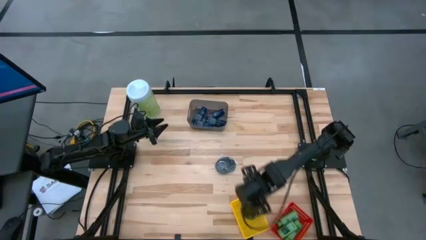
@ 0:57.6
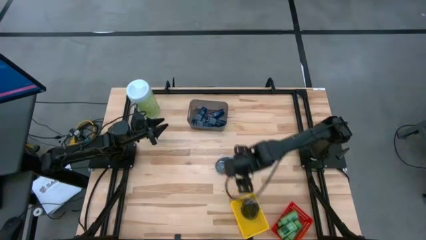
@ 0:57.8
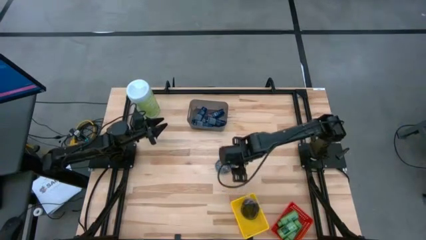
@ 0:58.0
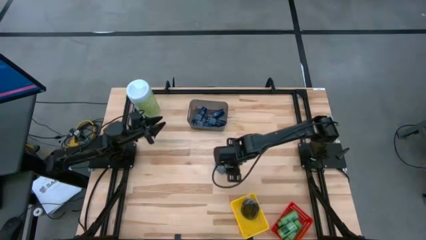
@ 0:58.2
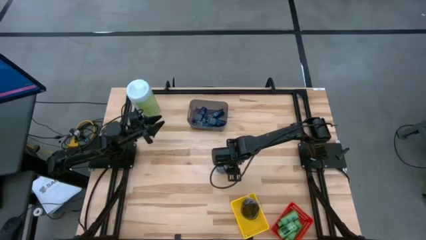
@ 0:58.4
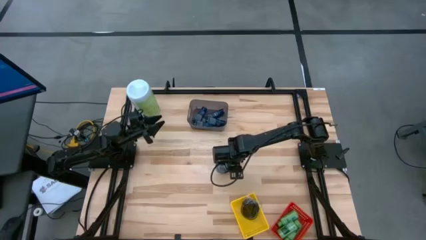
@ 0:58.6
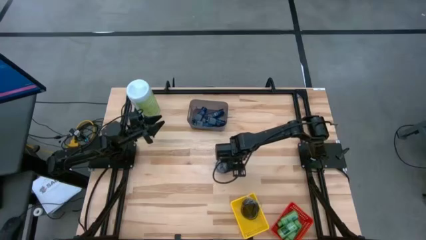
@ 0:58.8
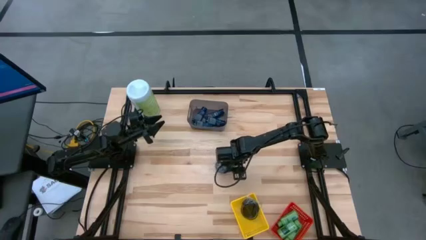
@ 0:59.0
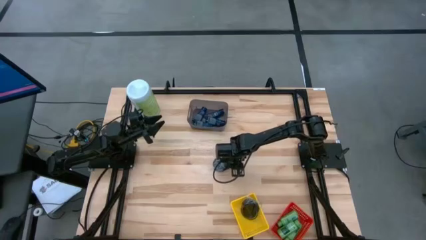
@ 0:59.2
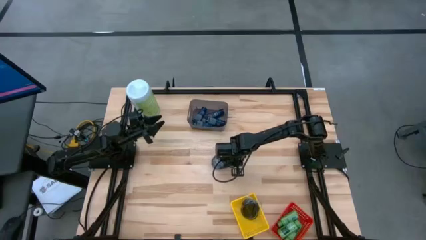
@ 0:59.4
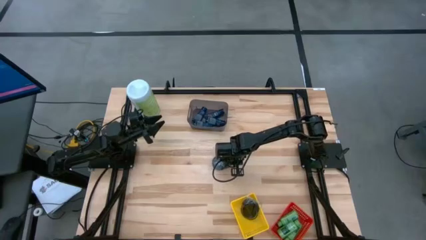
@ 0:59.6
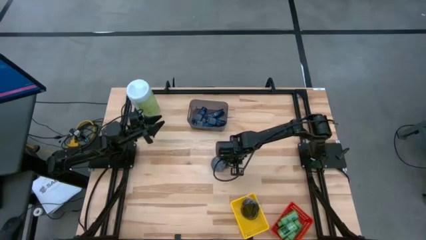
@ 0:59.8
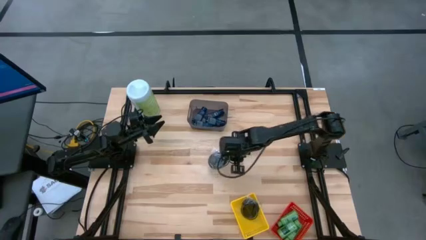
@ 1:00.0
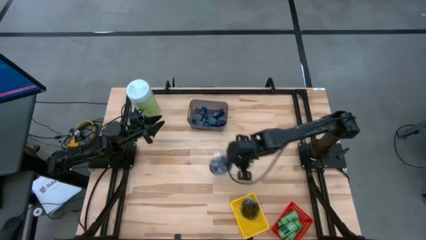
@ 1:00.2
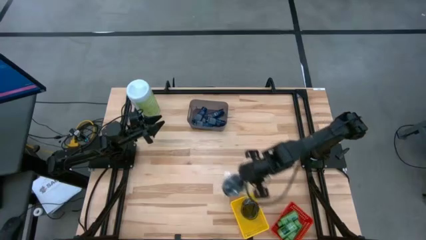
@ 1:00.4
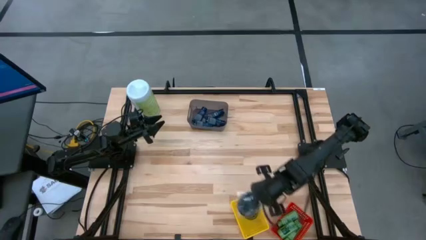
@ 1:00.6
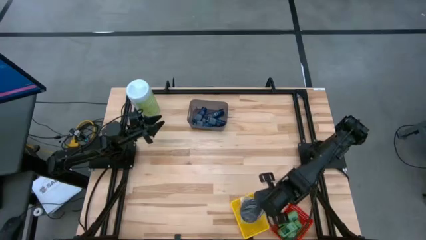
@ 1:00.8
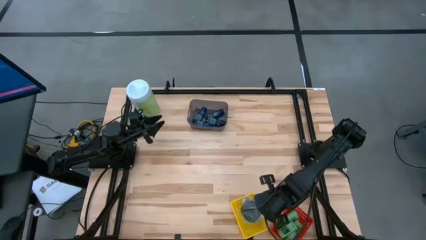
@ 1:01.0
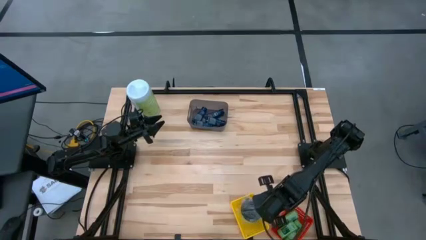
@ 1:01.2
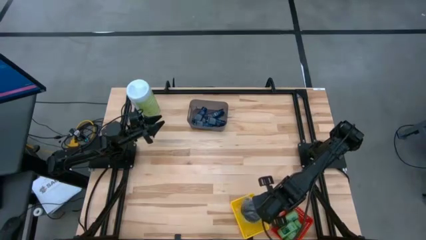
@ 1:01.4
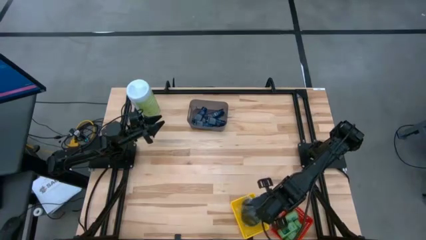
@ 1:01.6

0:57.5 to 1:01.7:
Task: Pick & Place Travel size toiletries
Put the black hairbrush on the yellow bin

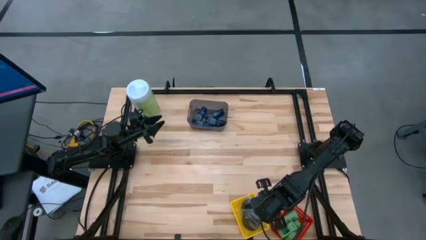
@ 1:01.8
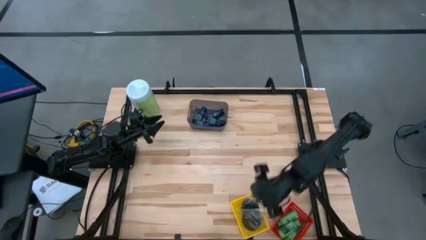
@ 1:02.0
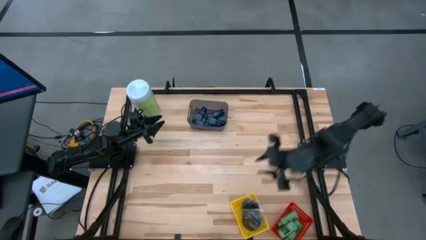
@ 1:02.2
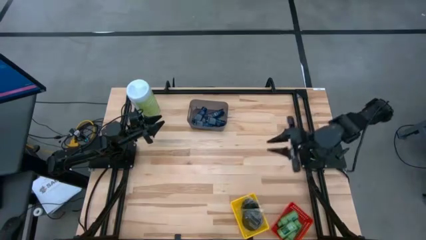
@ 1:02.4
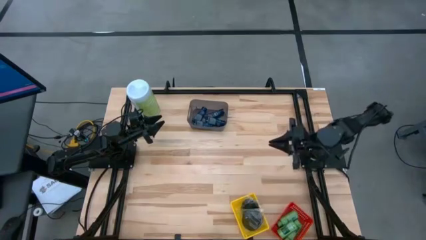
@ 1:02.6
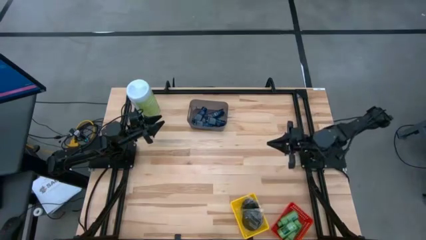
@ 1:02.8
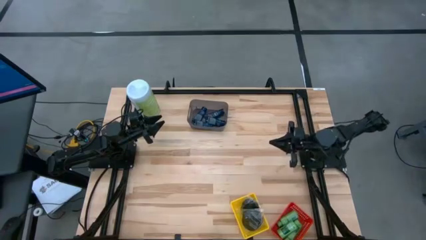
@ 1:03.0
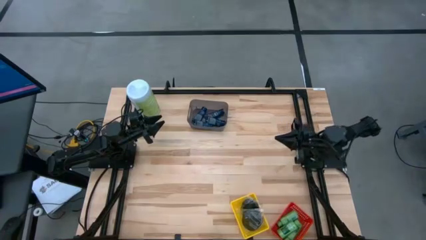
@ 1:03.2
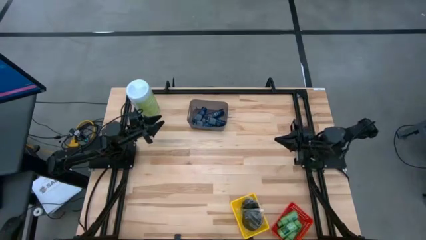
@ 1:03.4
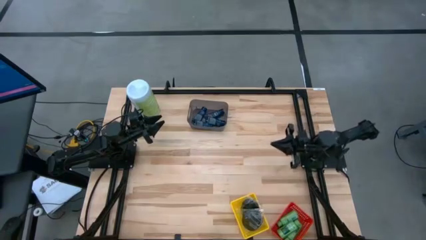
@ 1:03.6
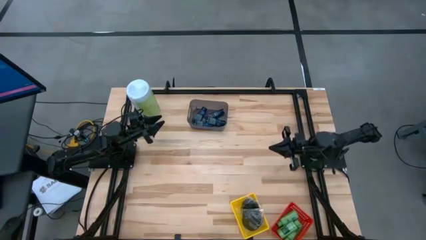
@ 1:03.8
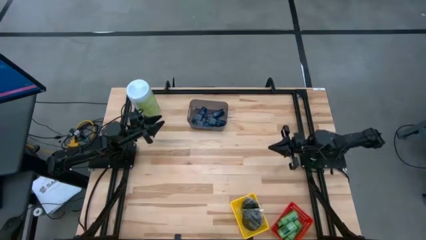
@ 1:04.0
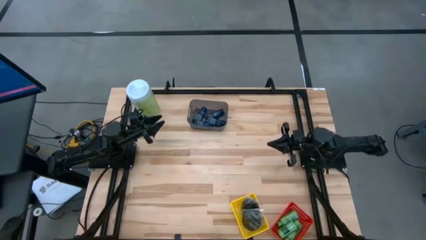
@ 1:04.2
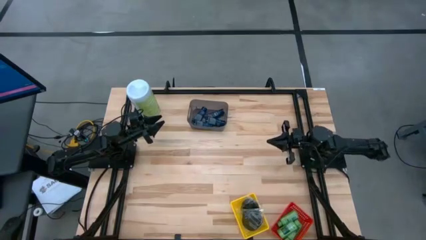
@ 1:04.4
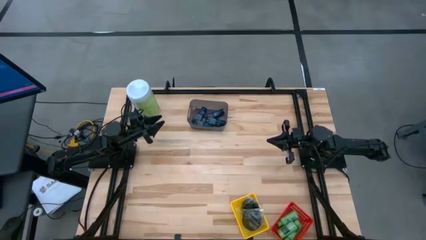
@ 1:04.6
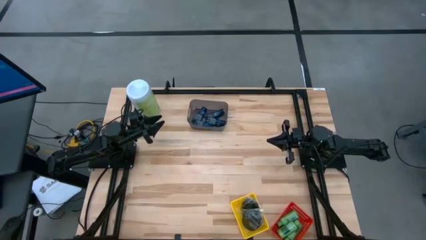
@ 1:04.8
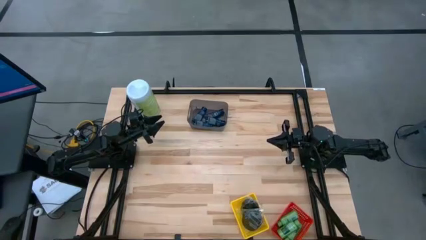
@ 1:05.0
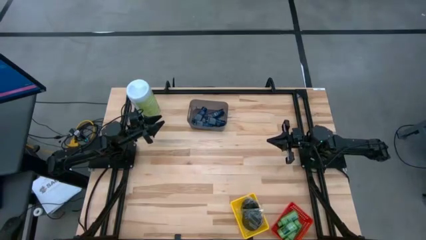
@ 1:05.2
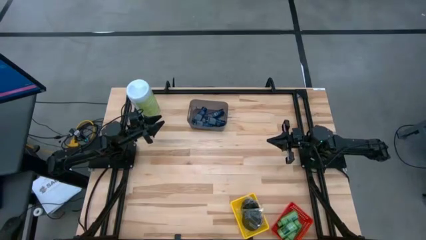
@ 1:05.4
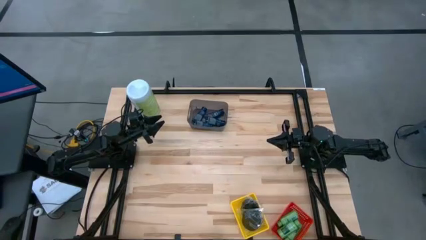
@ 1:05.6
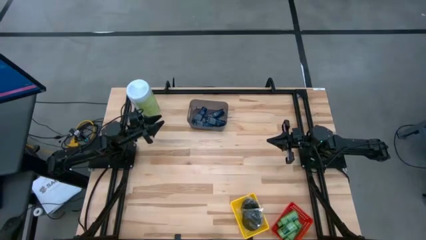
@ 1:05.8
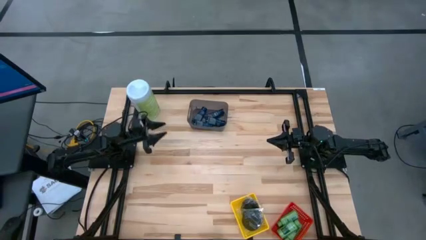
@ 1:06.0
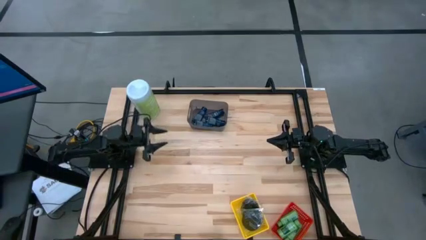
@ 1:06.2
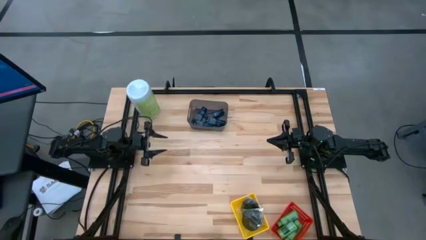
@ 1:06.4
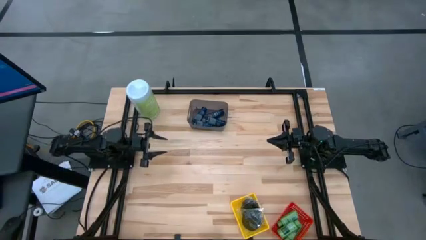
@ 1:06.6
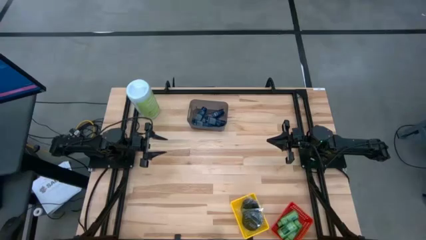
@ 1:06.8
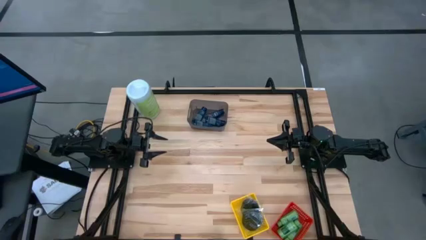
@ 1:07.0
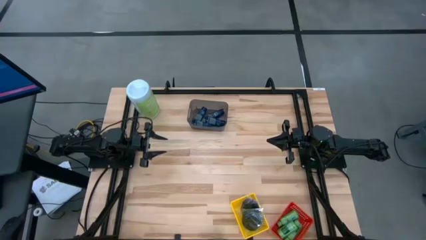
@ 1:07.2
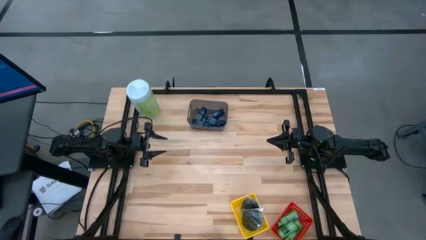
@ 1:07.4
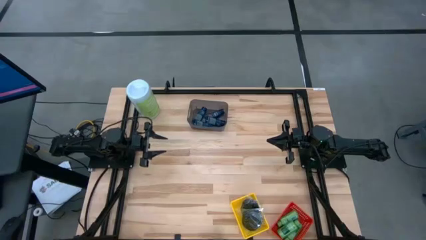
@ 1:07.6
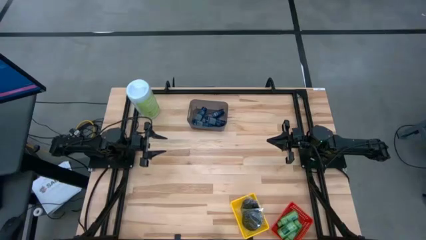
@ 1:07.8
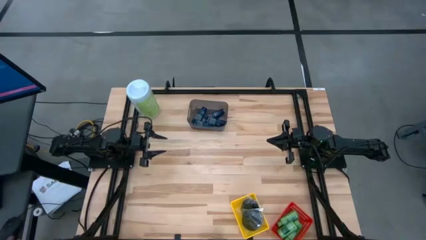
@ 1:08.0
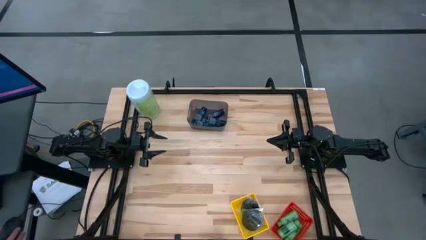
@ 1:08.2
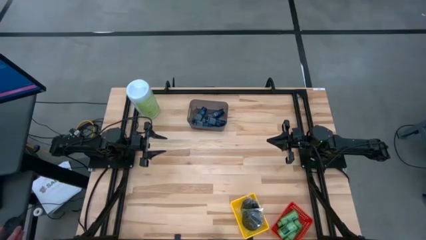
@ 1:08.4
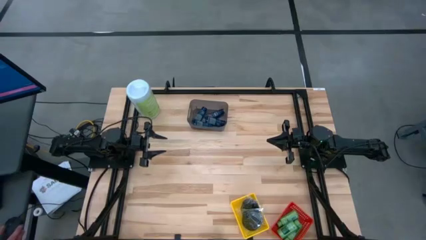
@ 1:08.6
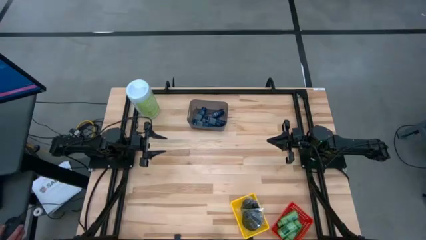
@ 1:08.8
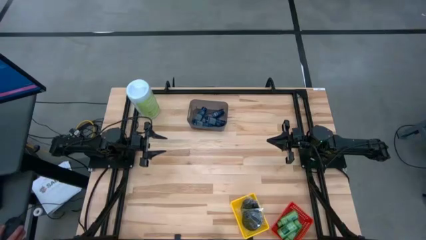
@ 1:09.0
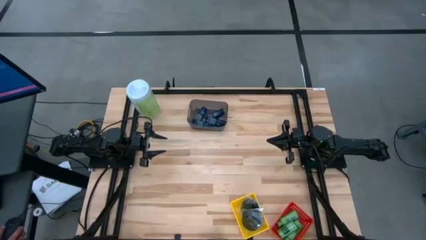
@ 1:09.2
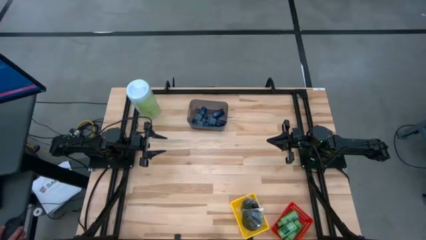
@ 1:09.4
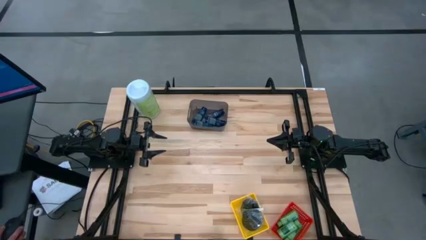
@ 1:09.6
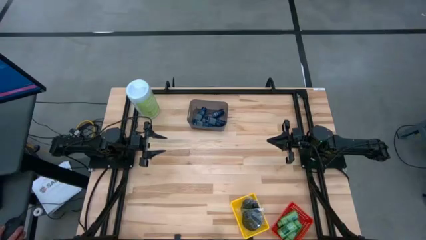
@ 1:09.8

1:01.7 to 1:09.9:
Return to Home Position

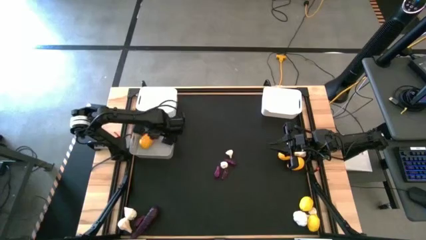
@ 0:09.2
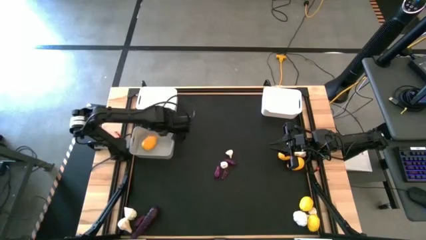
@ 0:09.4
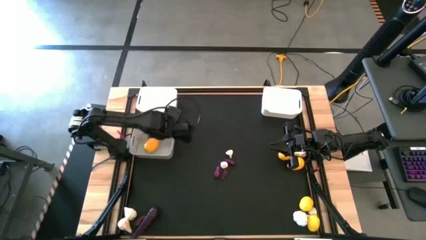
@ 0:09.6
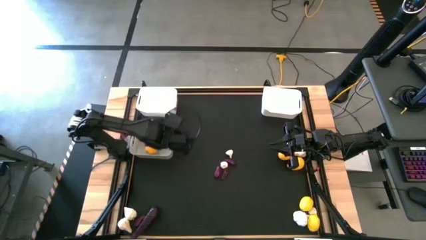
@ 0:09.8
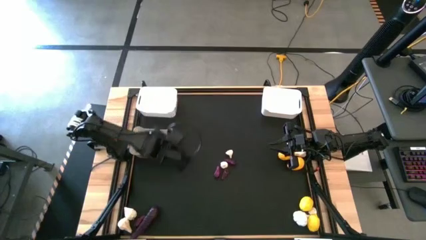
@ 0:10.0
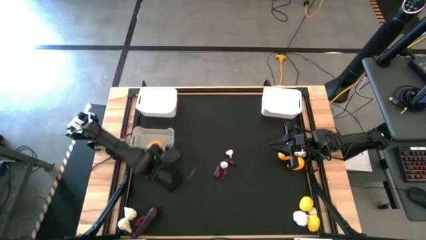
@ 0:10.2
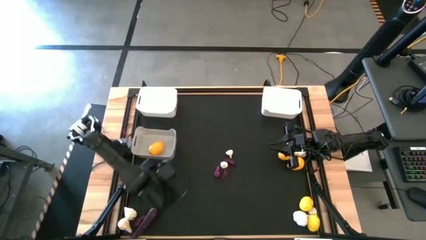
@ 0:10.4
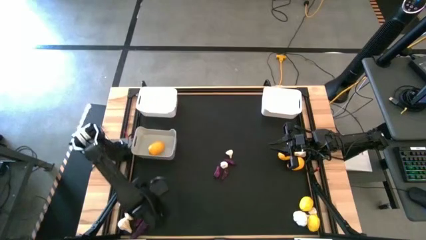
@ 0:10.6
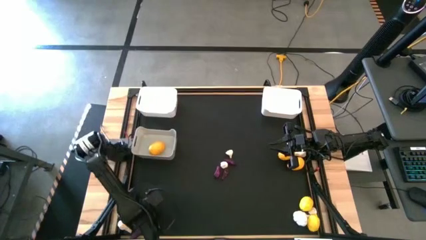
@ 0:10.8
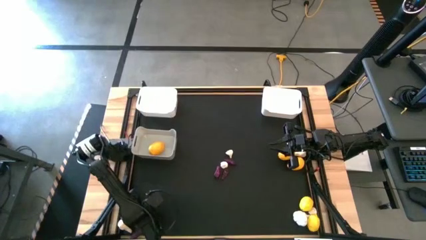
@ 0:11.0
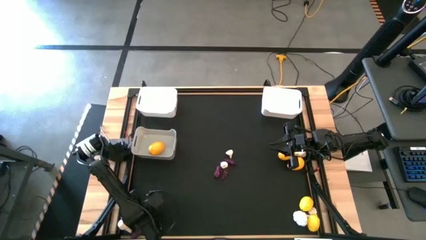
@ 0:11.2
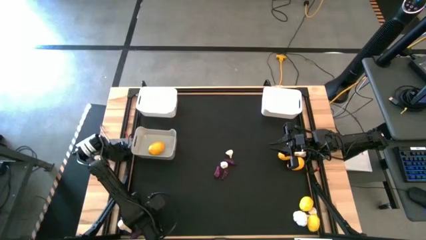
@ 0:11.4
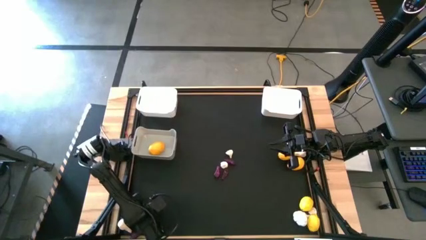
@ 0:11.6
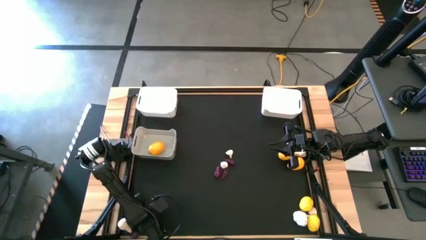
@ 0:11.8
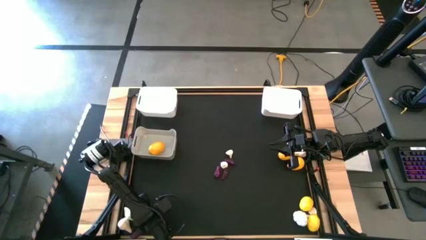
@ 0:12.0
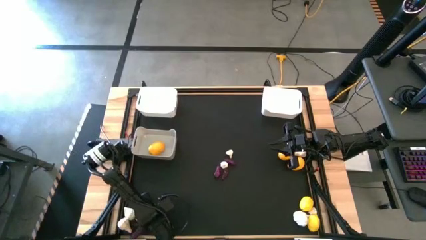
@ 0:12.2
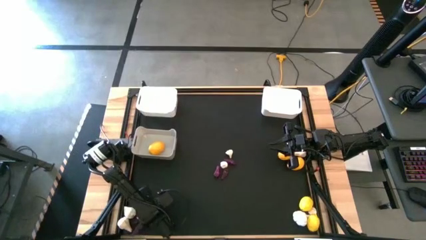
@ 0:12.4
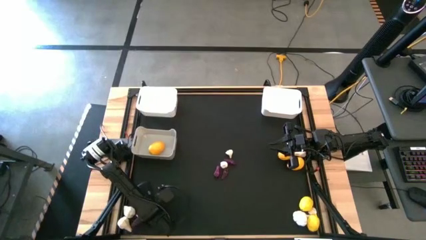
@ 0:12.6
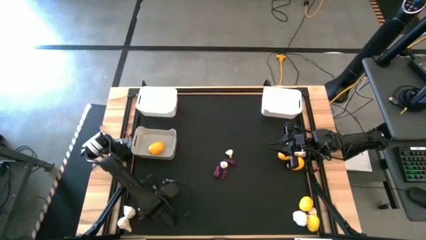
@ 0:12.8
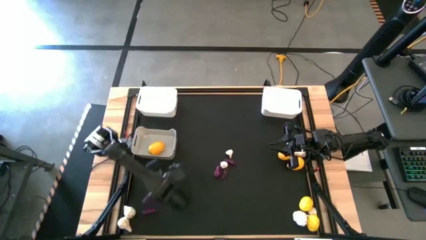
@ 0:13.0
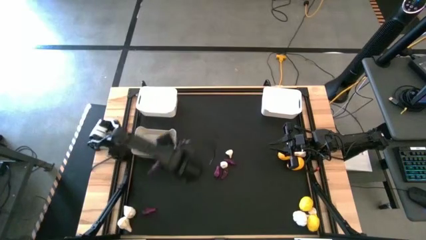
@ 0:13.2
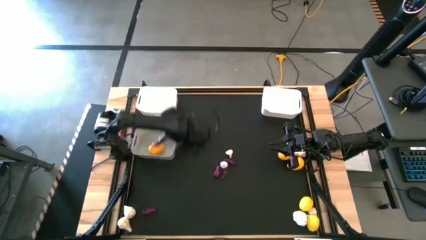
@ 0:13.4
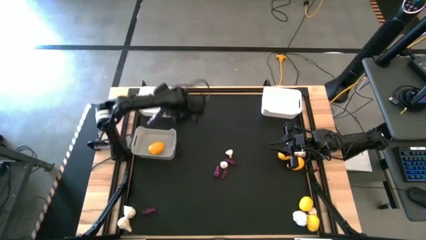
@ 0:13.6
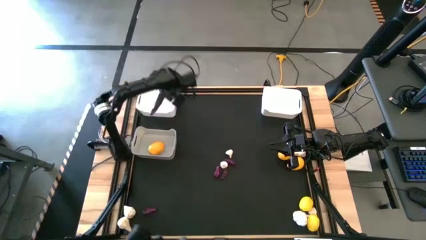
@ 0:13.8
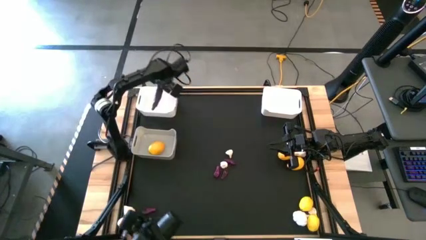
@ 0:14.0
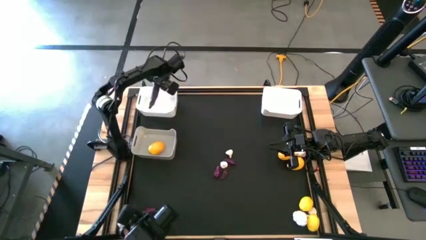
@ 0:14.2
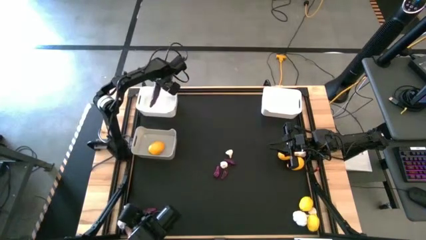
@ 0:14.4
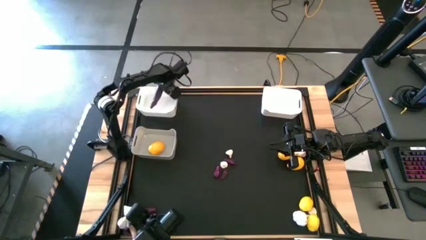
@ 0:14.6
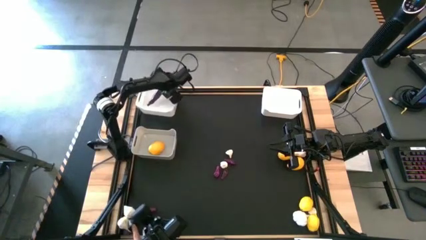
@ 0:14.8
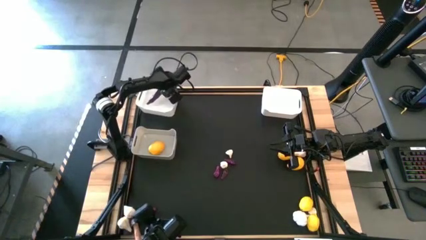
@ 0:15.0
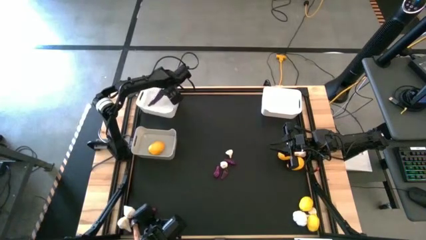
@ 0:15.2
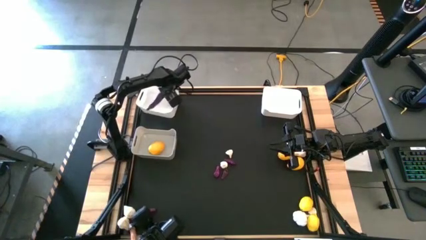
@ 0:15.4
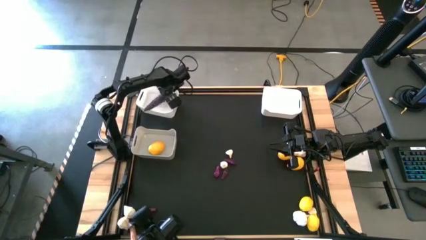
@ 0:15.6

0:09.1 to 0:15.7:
Task: Sort produce into baskets
Put the eggplant into the left white bin
